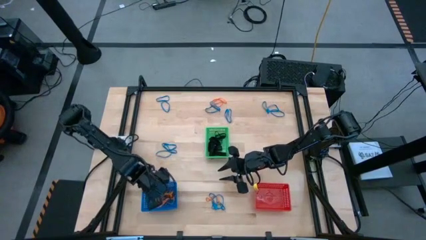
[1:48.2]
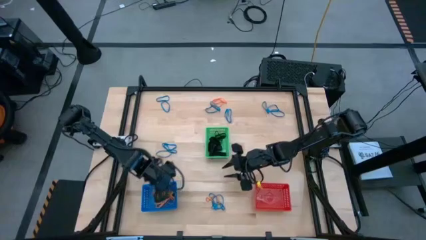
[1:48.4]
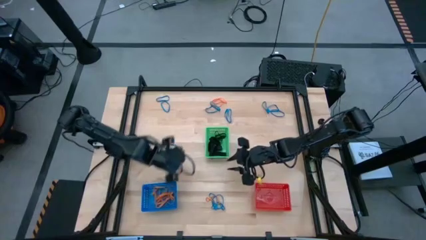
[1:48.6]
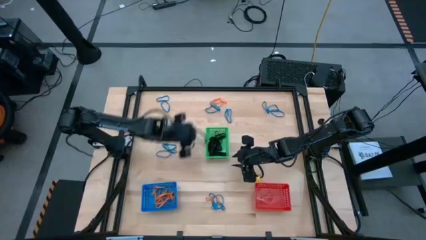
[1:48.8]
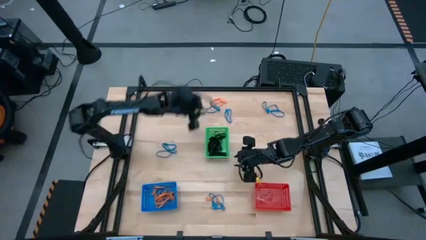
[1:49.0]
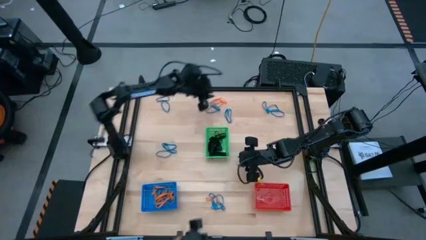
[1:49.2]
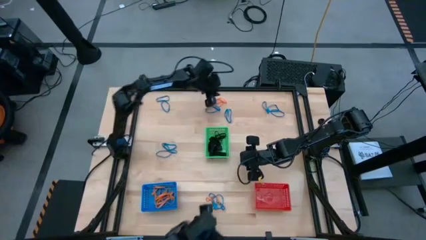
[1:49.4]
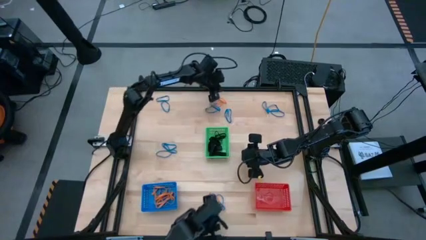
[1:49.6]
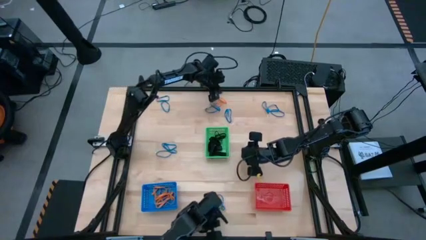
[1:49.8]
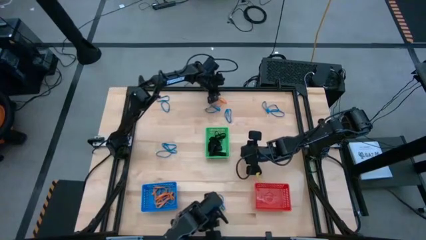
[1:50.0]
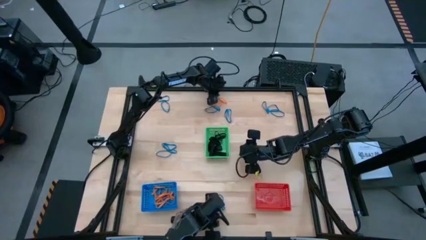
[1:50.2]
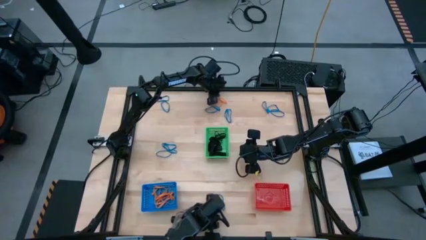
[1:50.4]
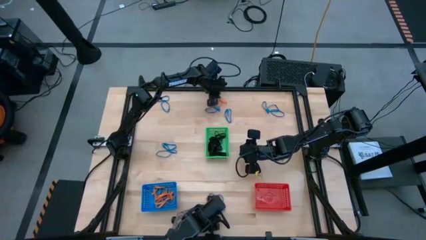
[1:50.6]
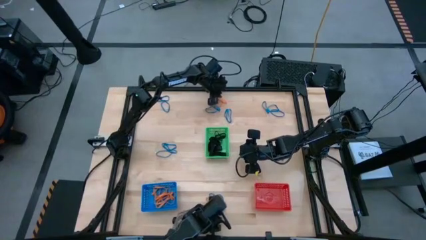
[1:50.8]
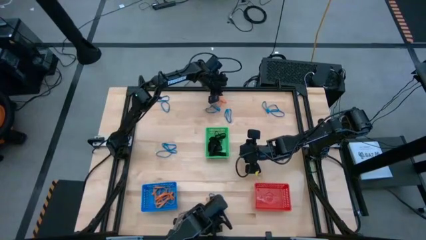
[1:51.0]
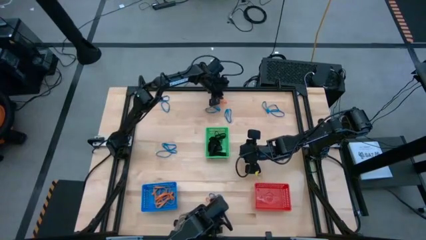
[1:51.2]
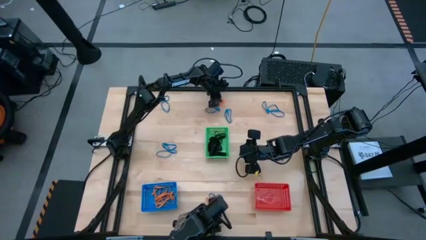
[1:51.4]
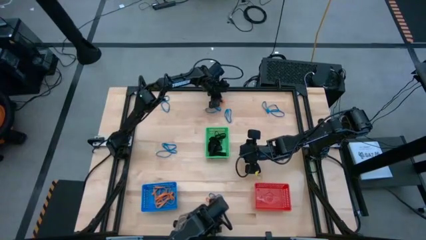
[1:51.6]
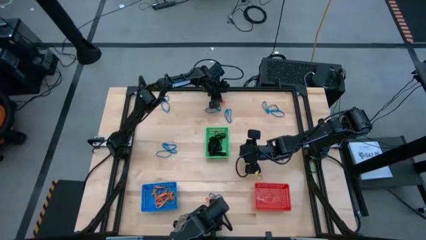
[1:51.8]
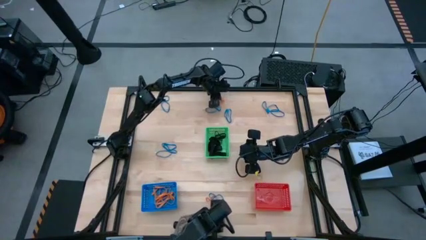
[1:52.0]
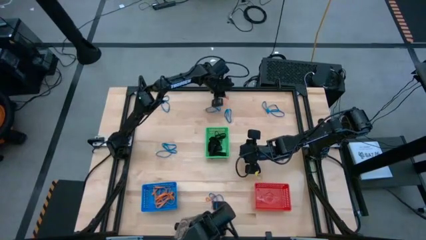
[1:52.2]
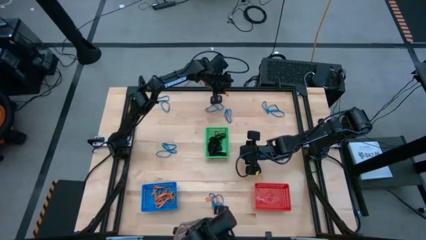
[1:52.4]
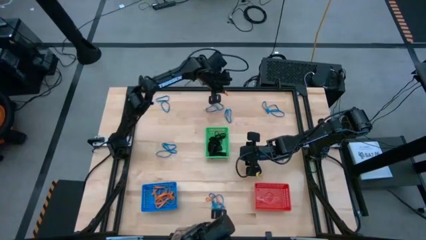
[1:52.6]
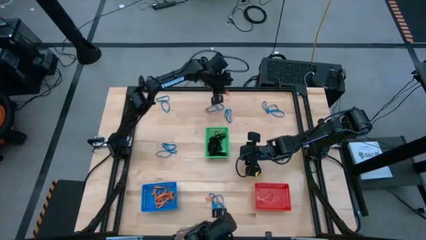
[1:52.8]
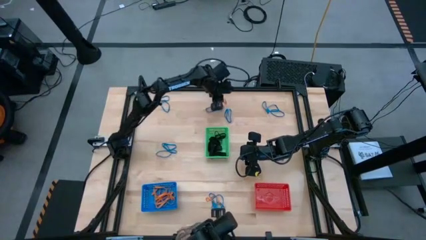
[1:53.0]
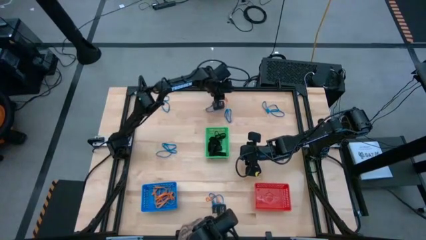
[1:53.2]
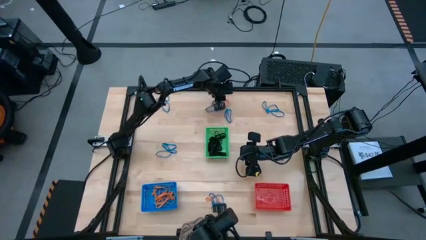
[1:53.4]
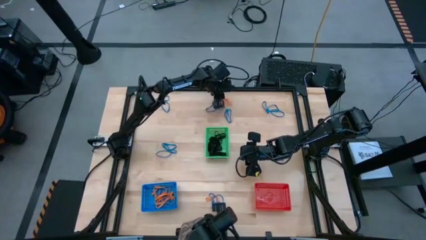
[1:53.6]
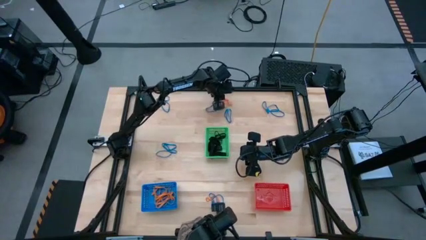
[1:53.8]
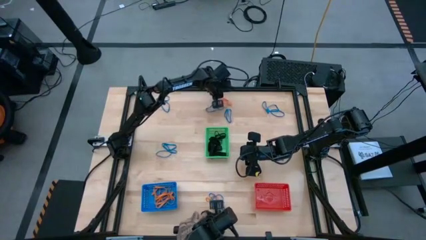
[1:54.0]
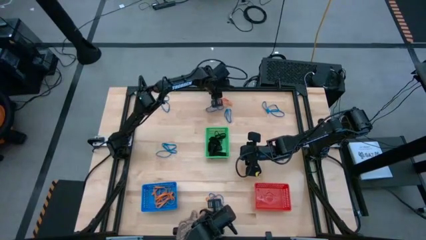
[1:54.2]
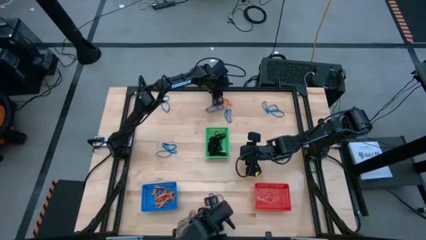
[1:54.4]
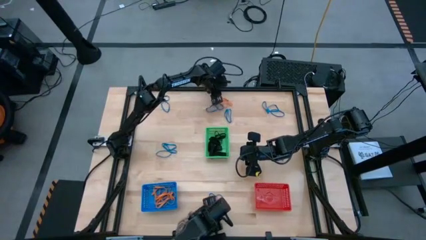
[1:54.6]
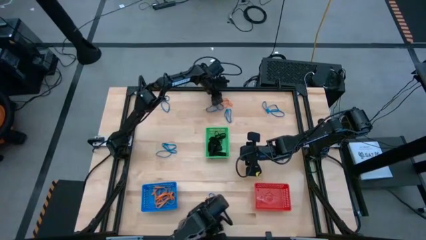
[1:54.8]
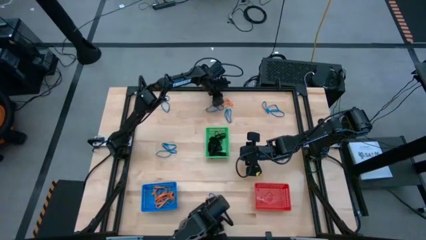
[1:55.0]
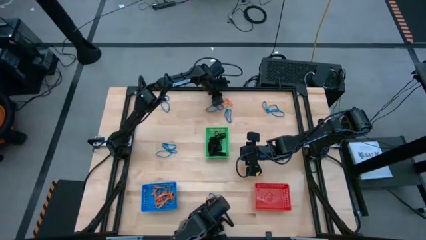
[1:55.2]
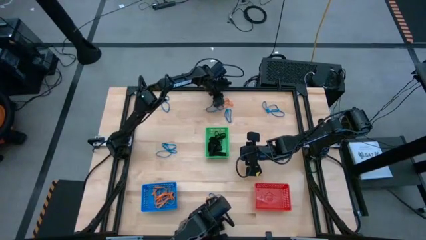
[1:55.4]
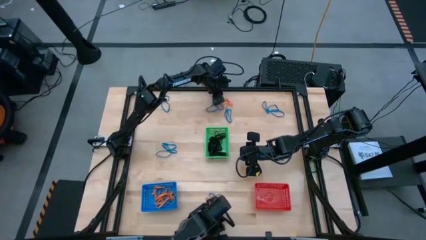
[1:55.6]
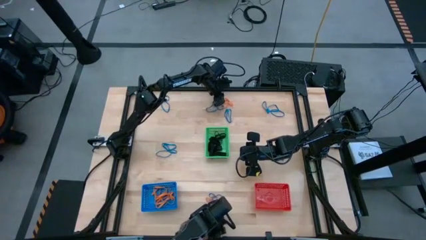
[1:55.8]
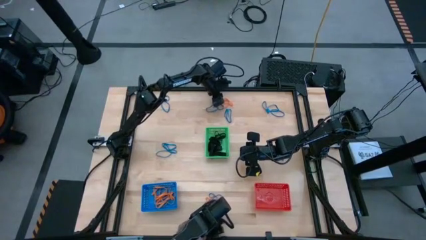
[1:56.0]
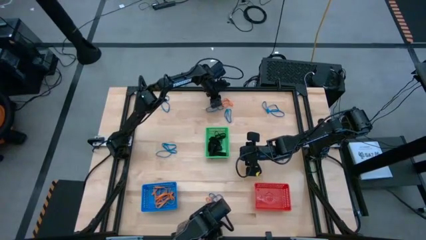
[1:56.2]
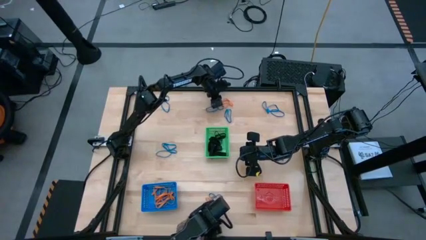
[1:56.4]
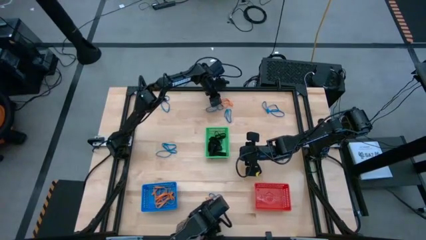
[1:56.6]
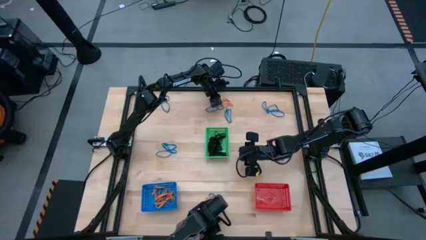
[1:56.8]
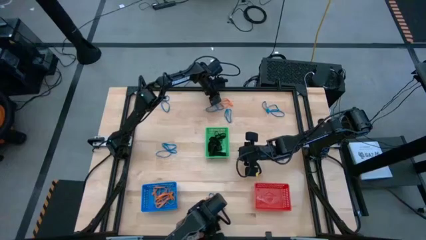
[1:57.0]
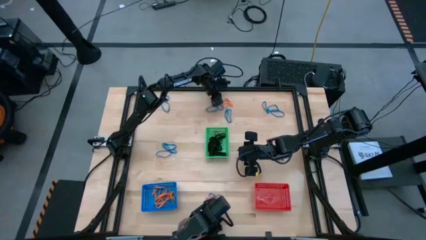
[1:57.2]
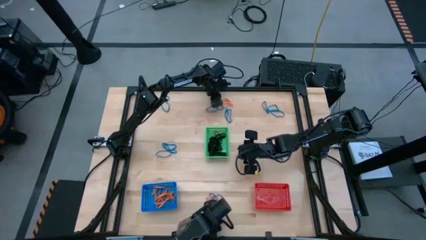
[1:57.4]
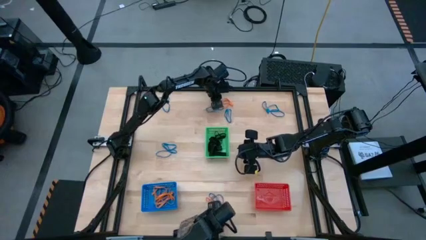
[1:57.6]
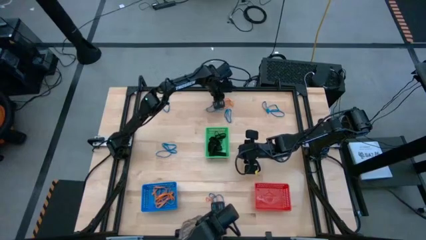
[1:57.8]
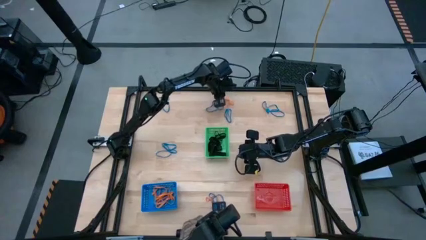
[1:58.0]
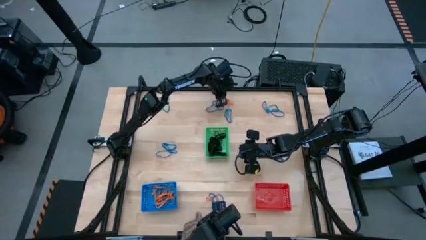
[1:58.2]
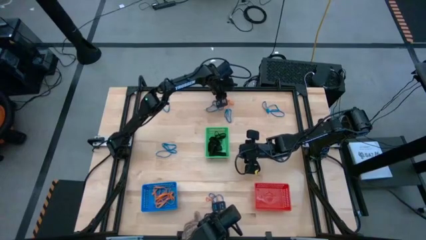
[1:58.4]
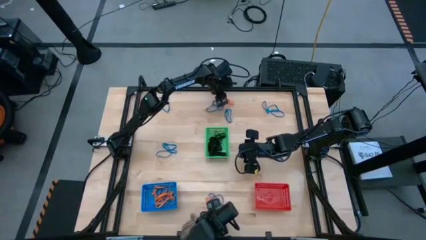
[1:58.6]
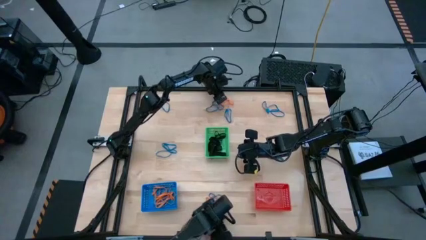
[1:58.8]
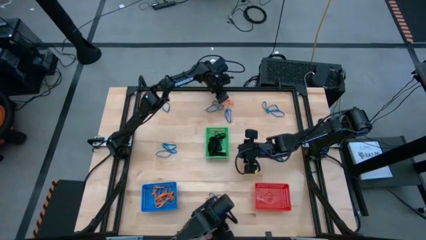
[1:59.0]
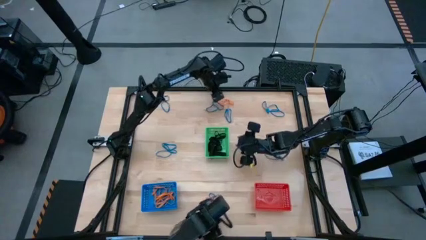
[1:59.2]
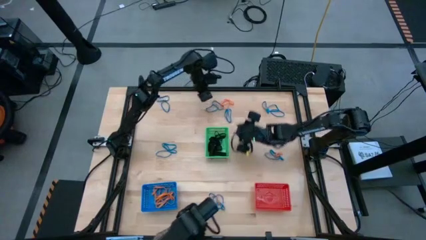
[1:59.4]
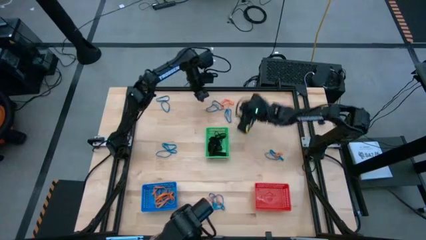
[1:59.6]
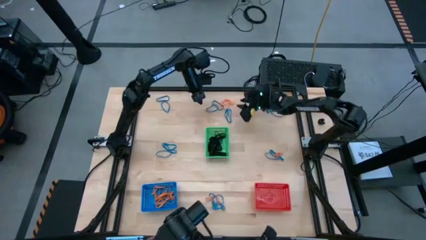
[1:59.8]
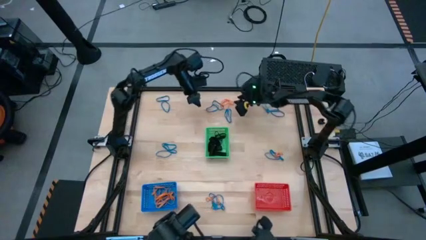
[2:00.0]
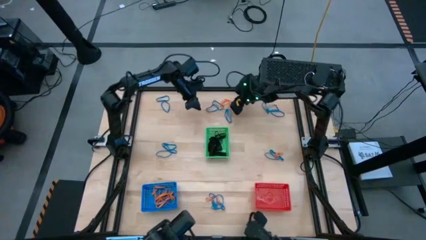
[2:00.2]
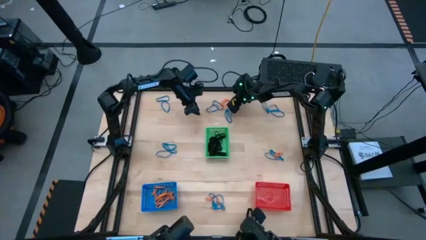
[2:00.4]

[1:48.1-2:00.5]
Task: Sort rubber bands into baskets
Put the orange rubber band into the blue bin

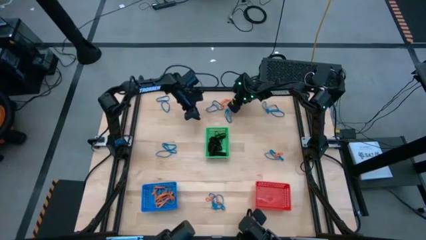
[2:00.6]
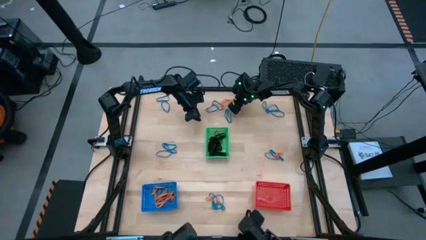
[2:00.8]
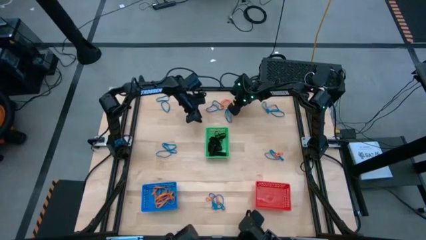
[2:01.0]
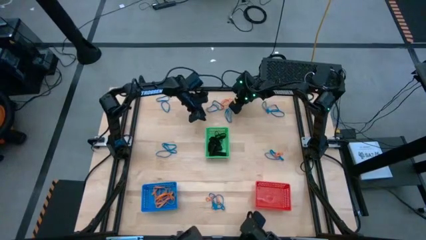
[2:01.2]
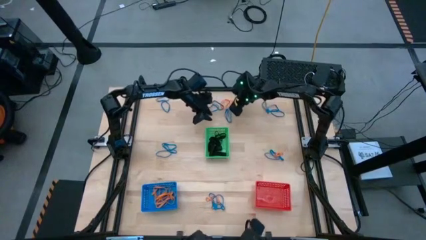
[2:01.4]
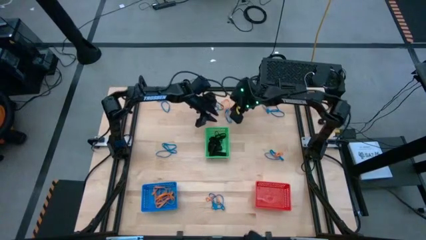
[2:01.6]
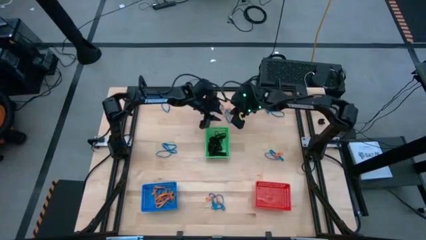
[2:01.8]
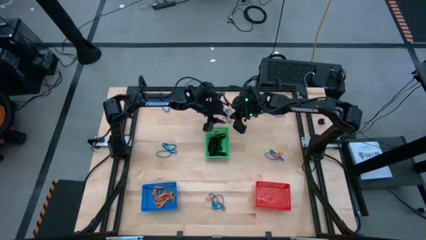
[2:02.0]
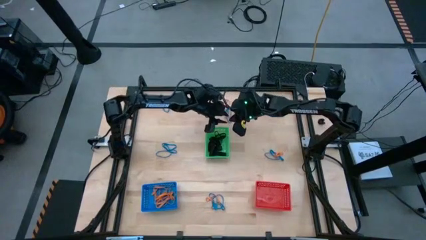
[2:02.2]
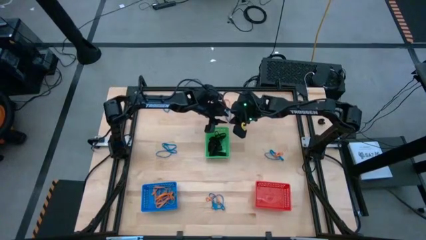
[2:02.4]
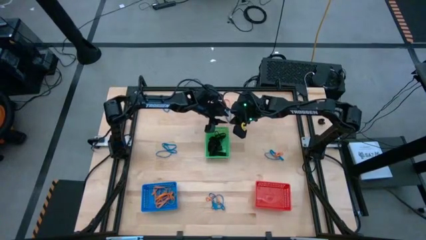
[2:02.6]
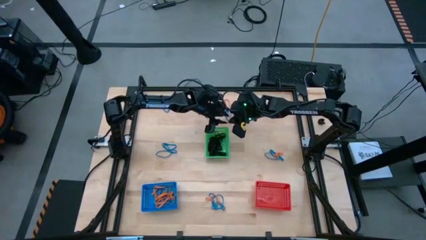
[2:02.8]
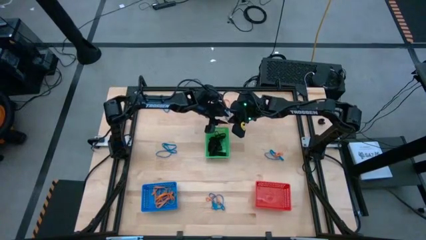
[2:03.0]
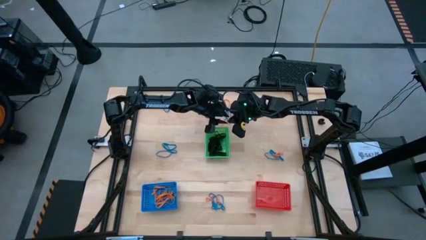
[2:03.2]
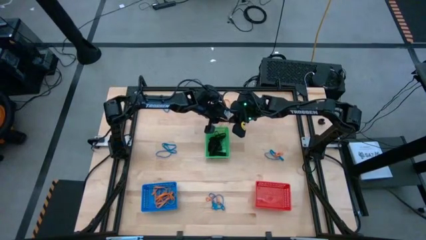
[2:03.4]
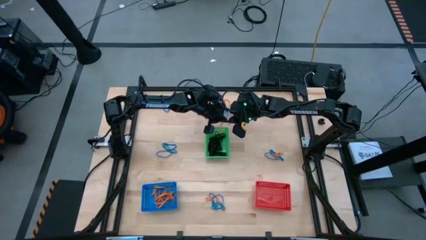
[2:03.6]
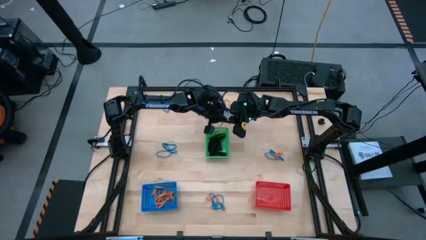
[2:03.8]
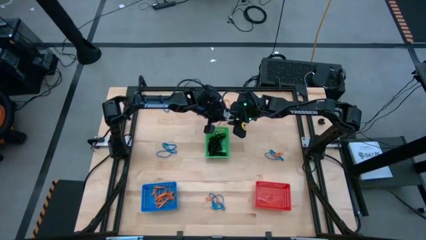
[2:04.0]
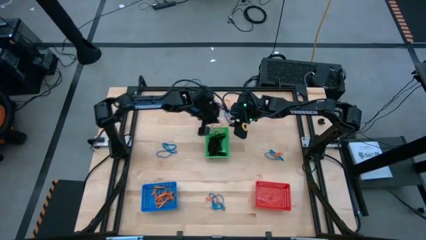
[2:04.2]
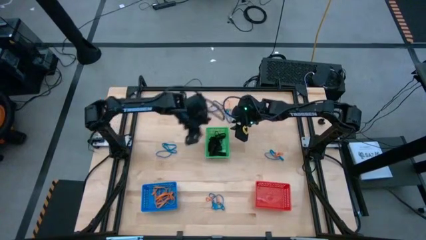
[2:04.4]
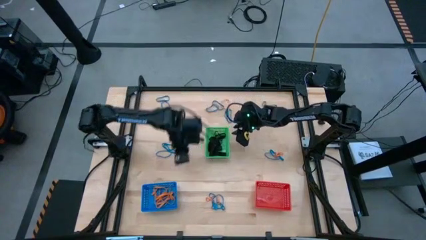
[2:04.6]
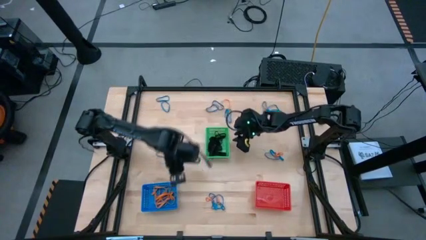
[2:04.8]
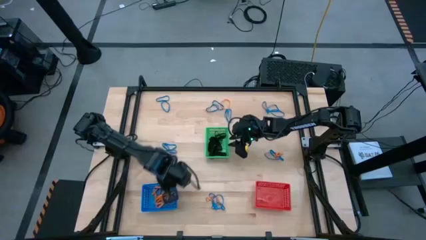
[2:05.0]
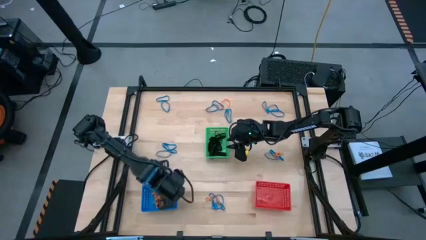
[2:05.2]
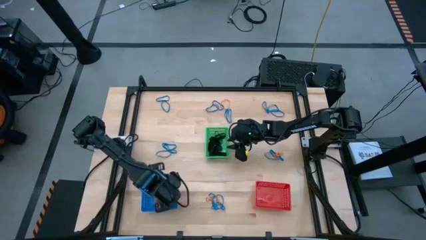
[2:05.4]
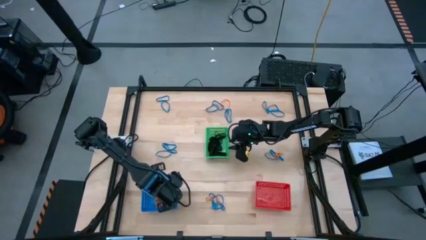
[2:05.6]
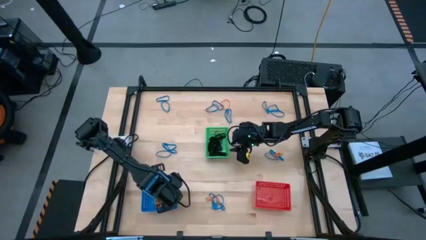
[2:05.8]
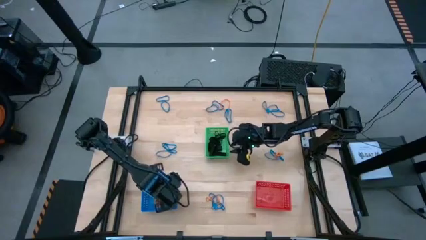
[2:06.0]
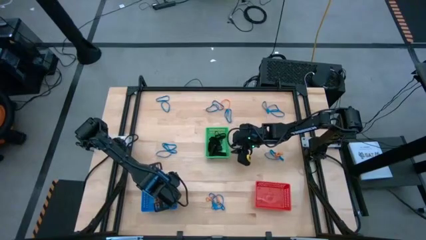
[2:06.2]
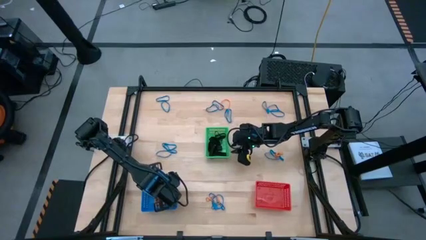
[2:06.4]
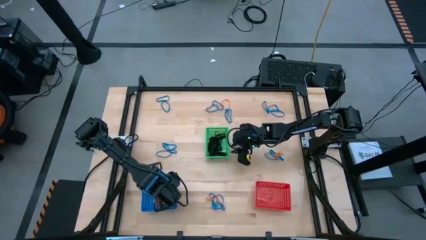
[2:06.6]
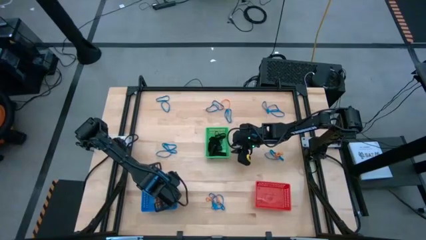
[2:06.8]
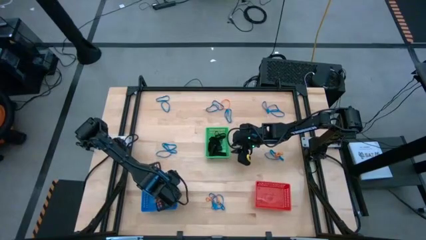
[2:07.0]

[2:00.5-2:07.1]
Put the orange rubber band into the blue bin
